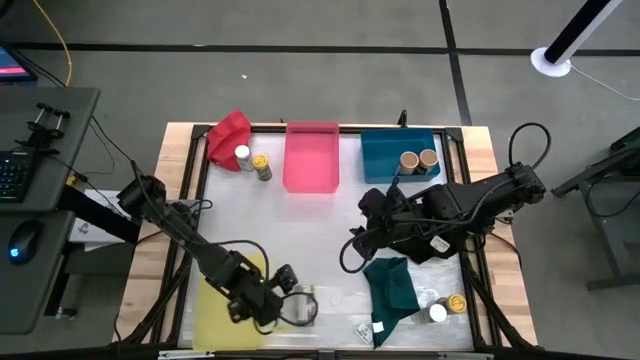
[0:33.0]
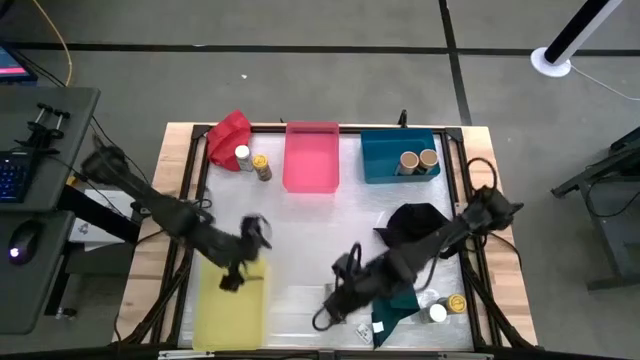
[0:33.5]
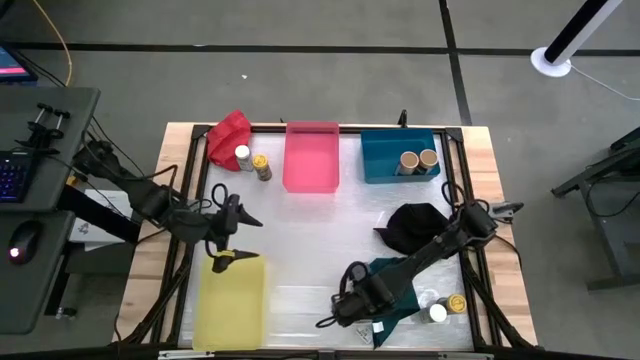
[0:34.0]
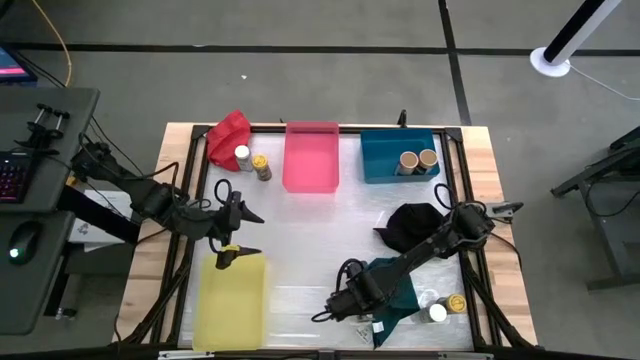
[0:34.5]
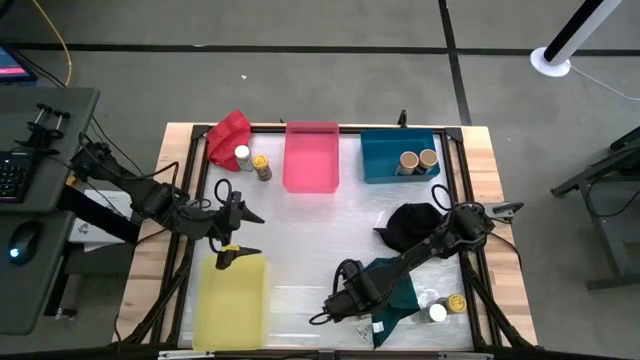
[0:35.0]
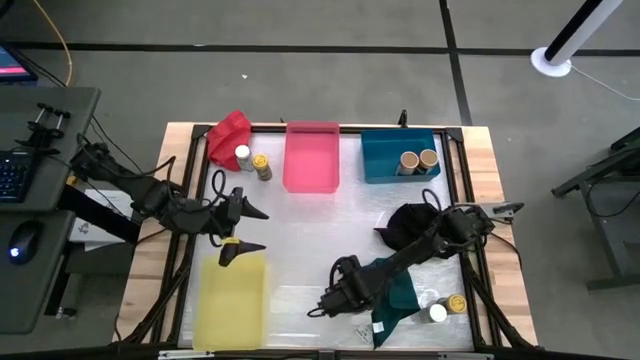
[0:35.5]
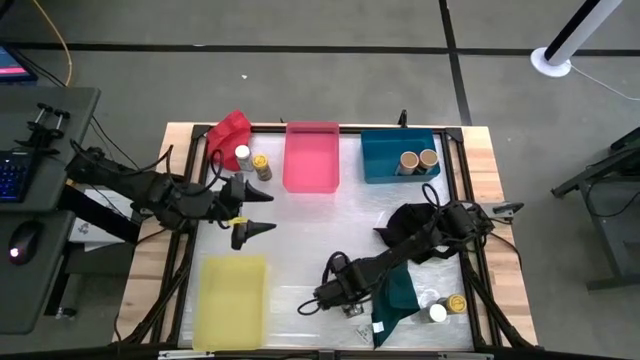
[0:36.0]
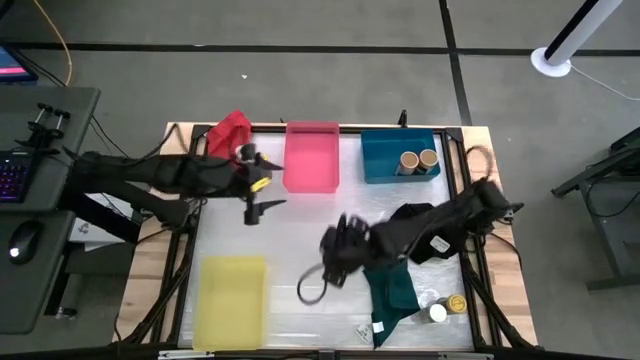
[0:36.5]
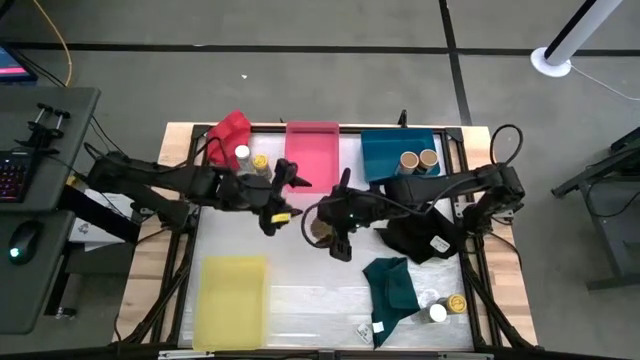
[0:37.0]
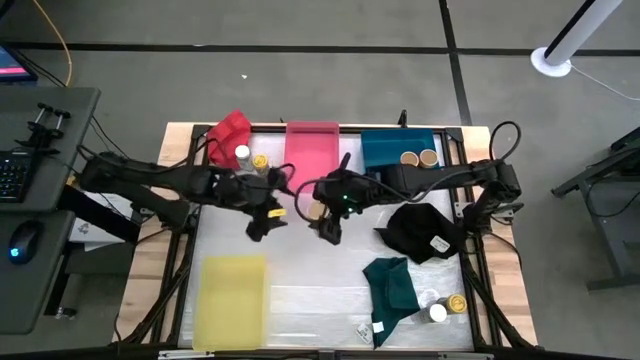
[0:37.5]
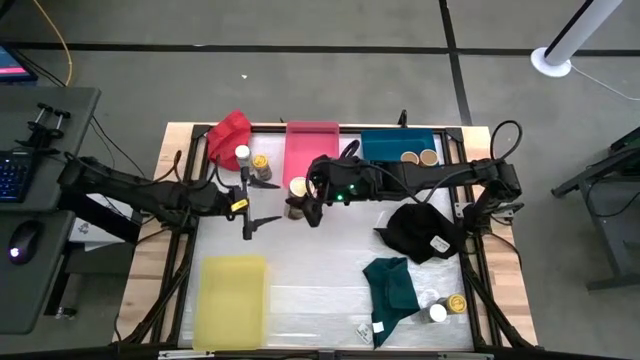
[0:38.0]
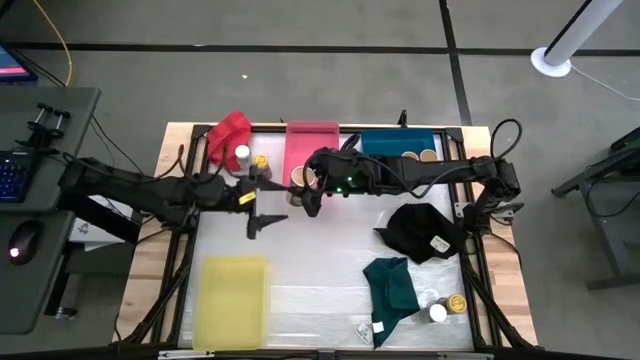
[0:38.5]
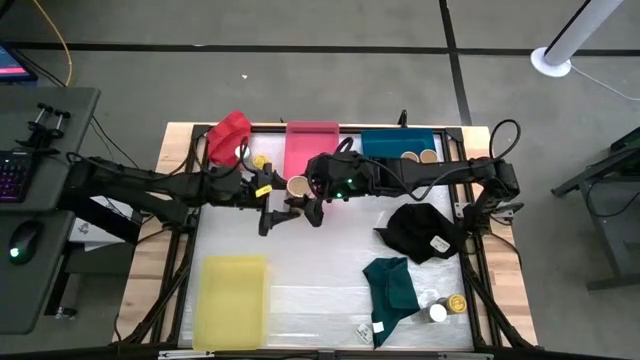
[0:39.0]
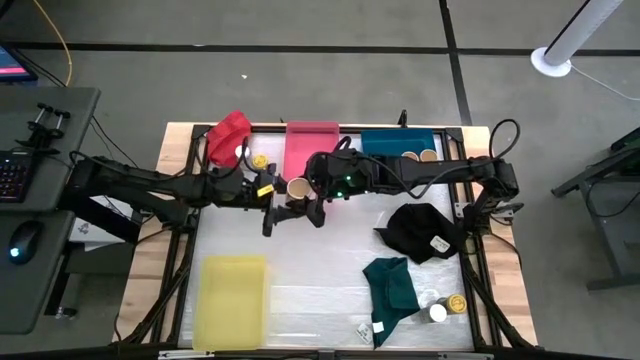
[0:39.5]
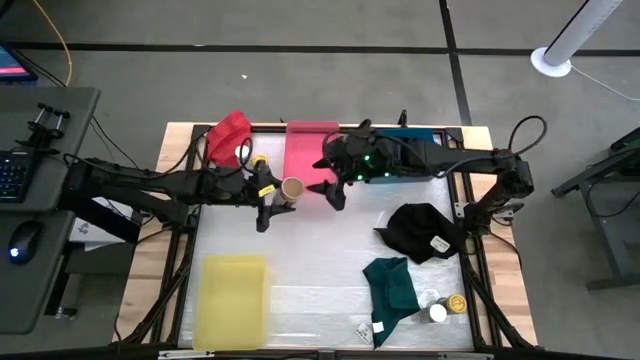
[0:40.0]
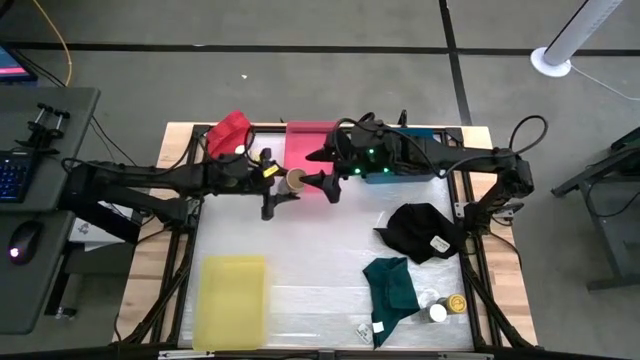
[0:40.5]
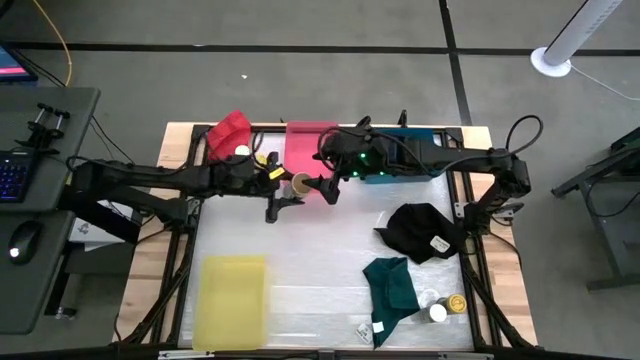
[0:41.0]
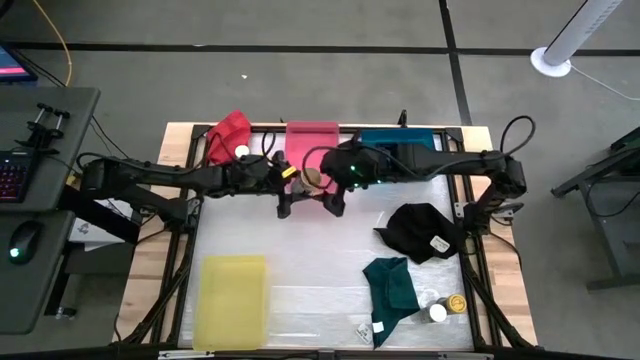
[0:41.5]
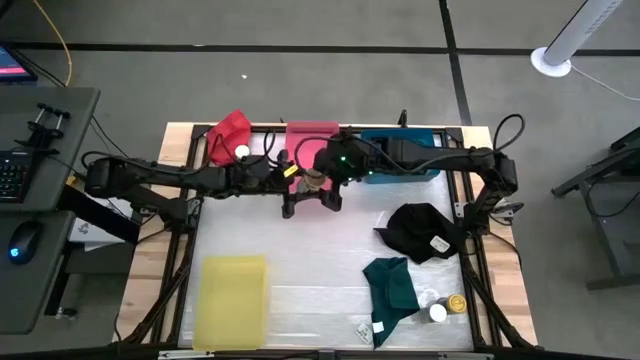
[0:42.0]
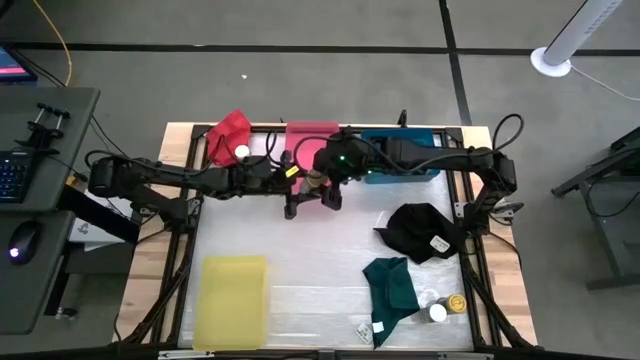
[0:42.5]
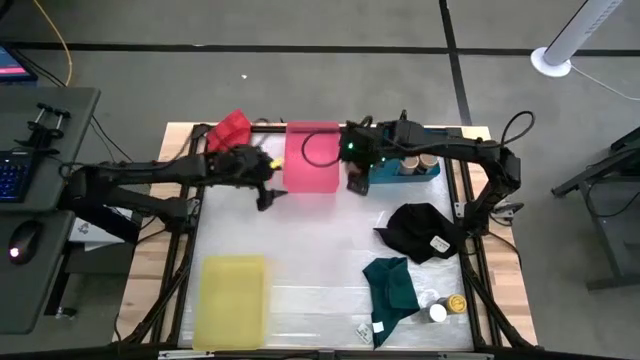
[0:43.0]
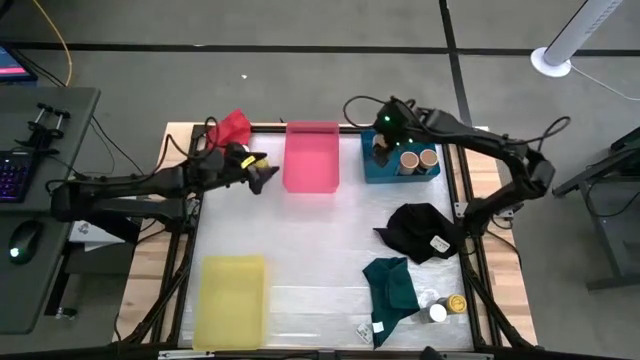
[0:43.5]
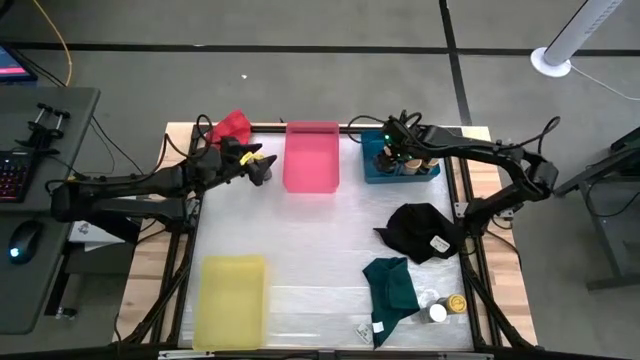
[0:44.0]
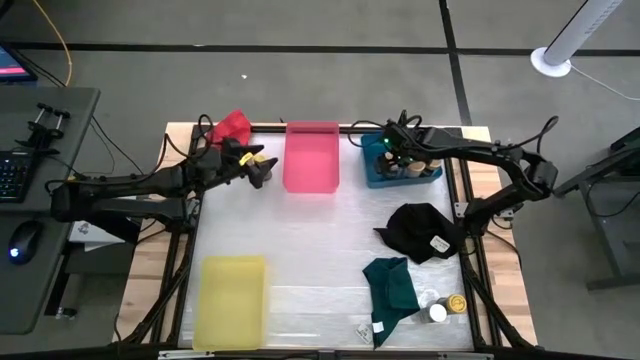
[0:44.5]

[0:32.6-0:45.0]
Task: Sort spices by type
Put the gold seasoning bottle into the blue bin

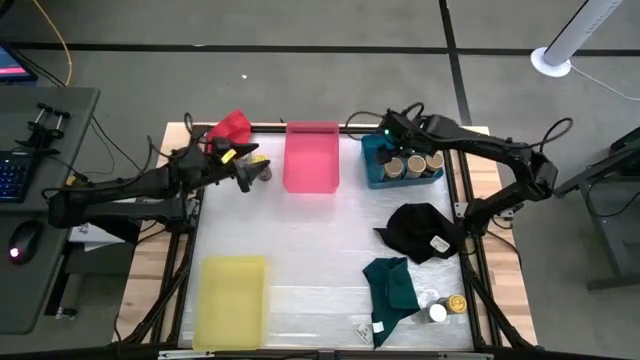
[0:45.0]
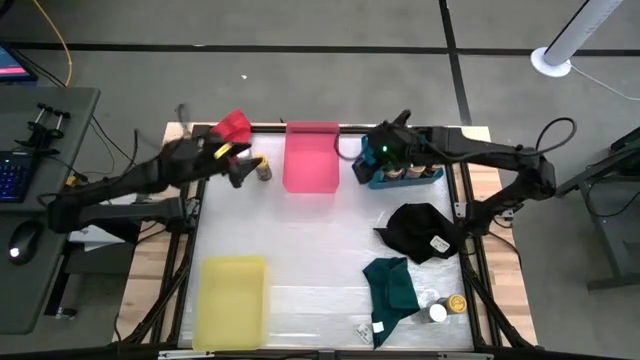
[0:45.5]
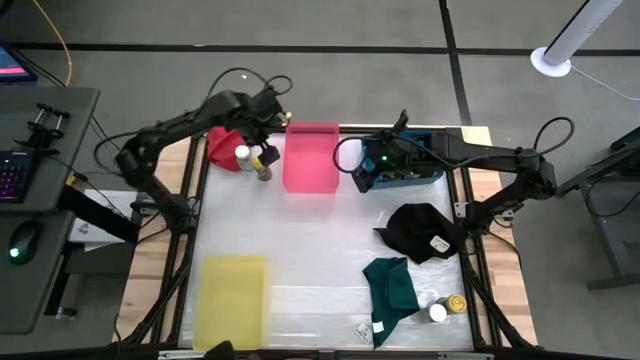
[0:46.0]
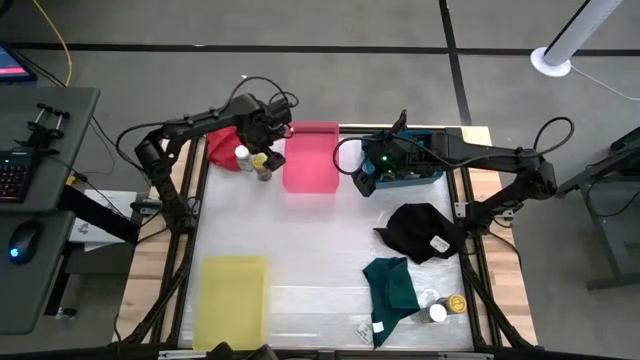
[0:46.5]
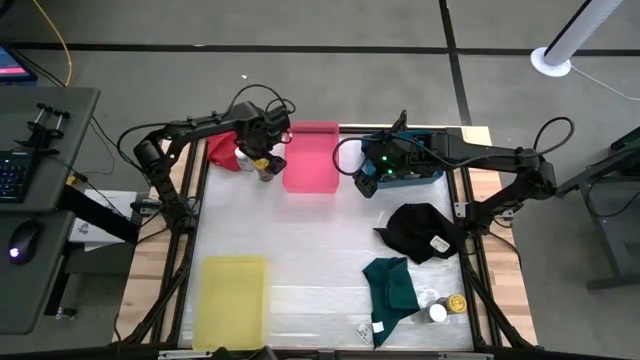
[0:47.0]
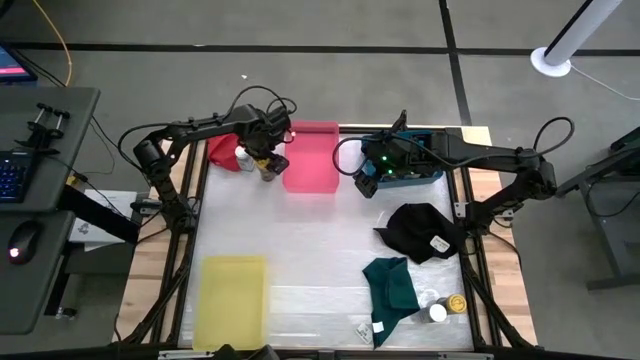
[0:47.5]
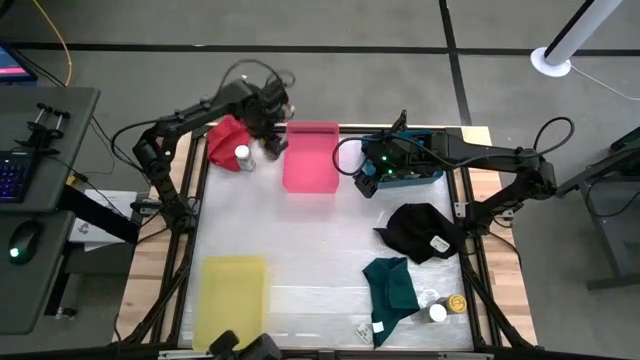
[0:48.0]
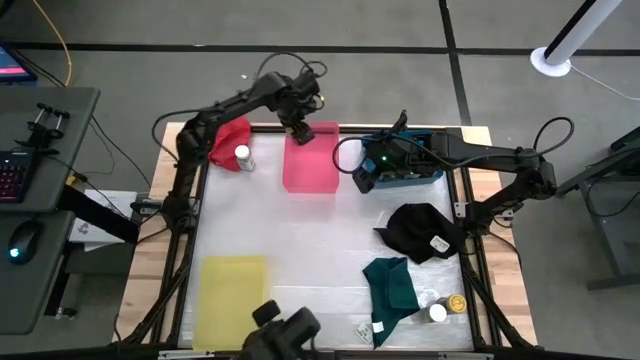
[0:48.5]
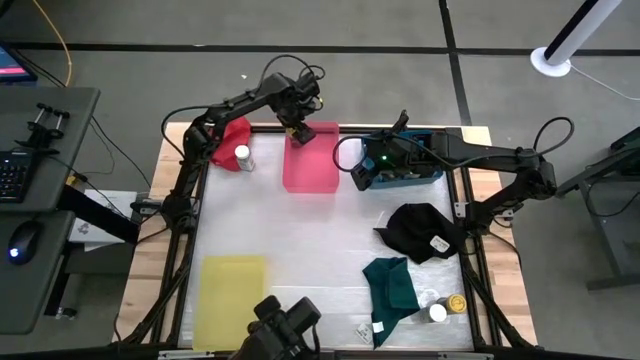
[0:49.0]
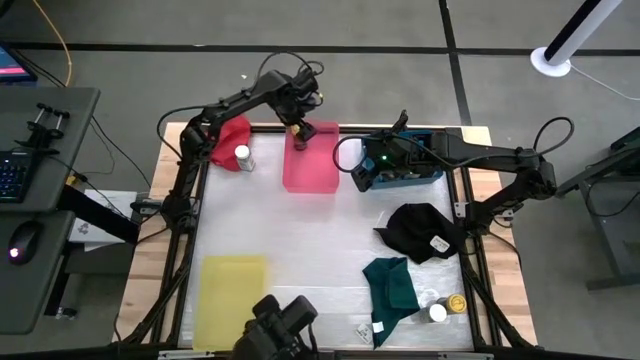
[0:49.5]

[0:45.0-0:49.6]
Put the top yellow seasoning bottle into the pink bin

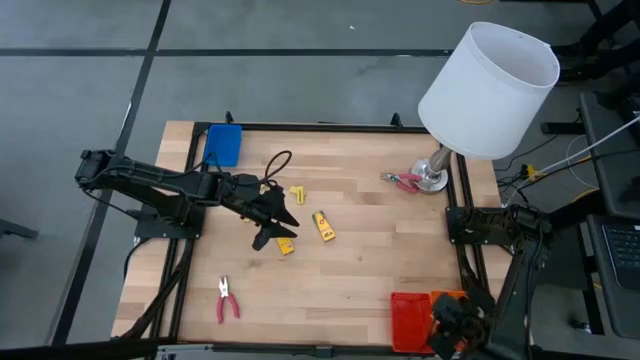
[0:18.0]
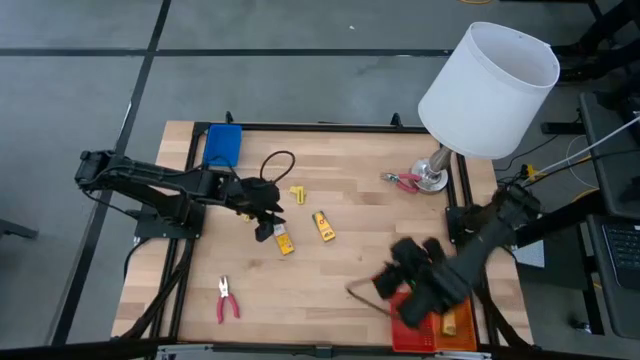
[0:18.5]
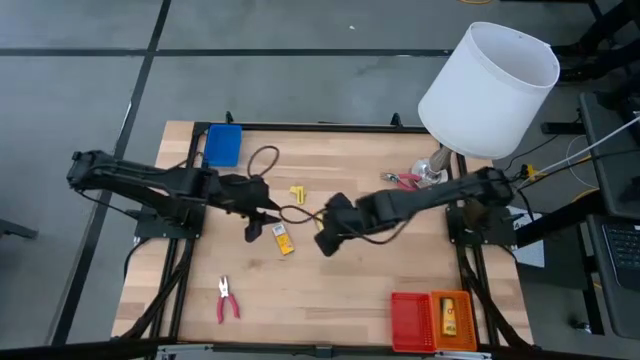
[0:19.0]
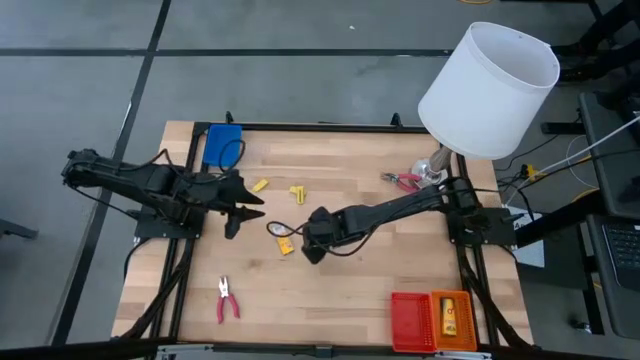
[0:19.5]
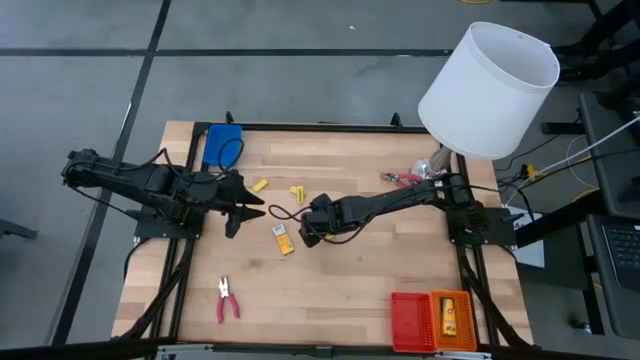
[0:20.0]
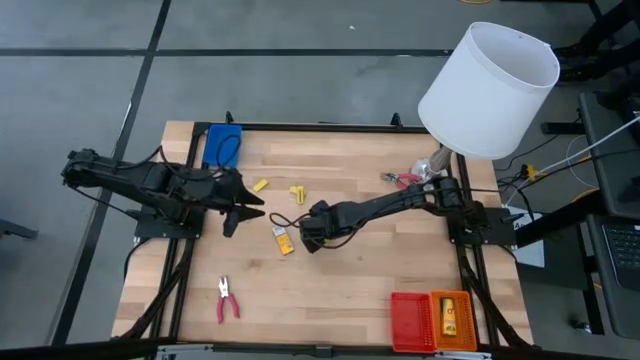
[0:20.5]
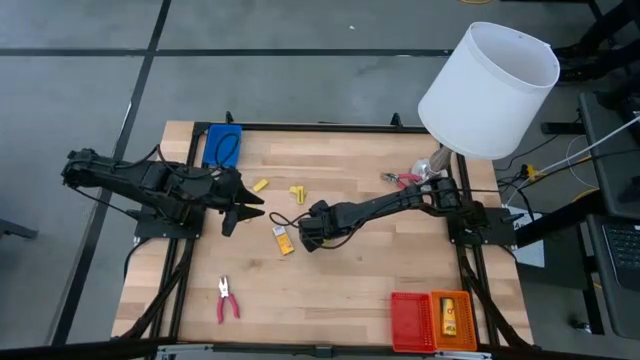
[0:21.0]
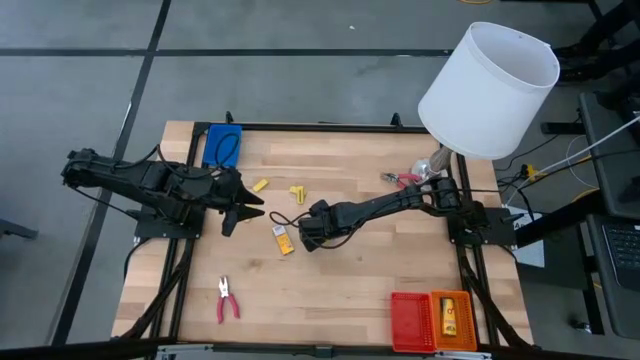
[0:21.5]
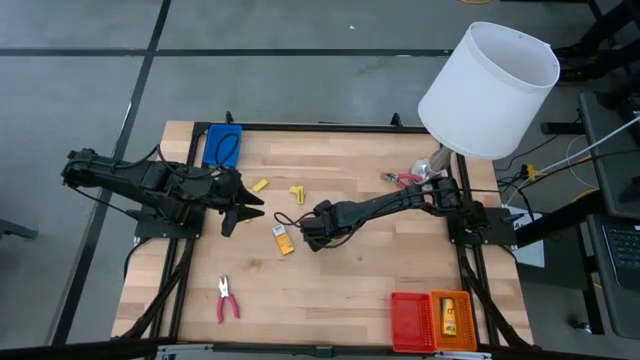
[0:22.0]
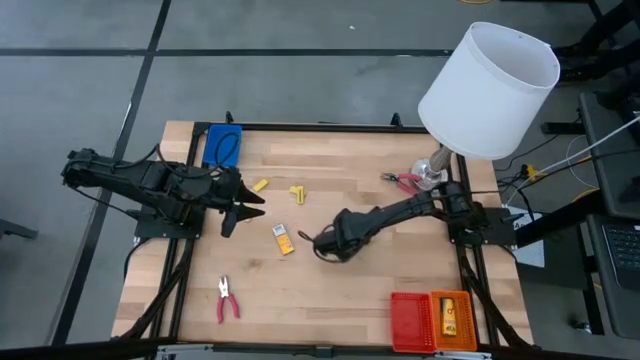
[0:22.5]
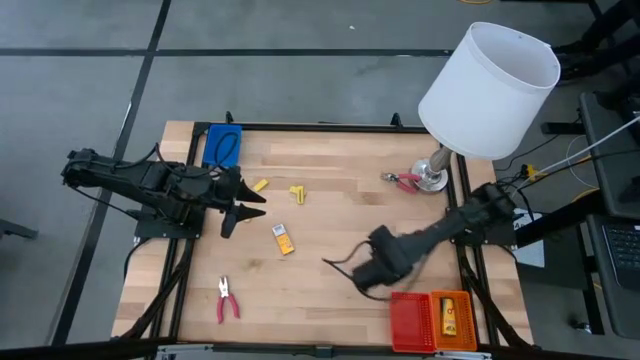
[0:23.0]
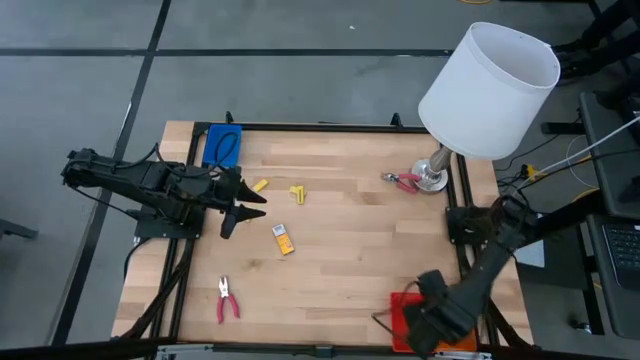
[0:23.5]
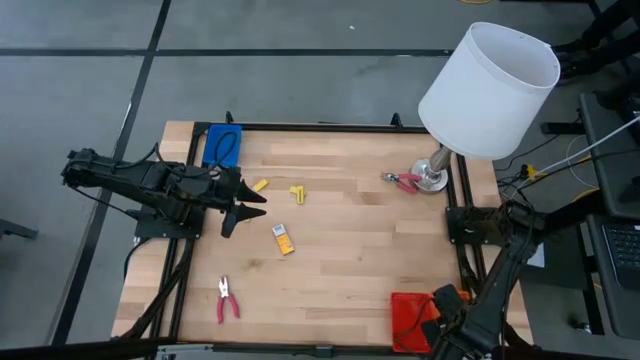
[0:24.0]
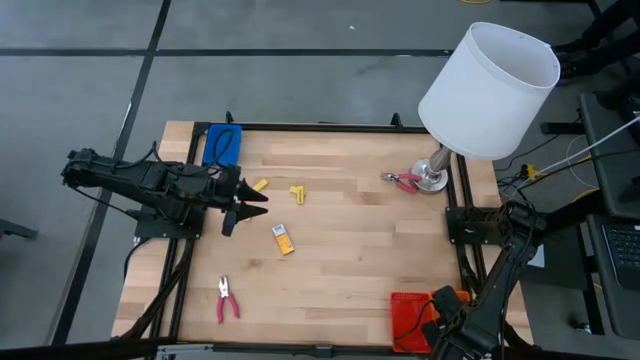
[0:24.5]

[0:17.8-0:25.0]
Task: Pick & Place School Supplies
Put the yellow crayon box into the orange bin
